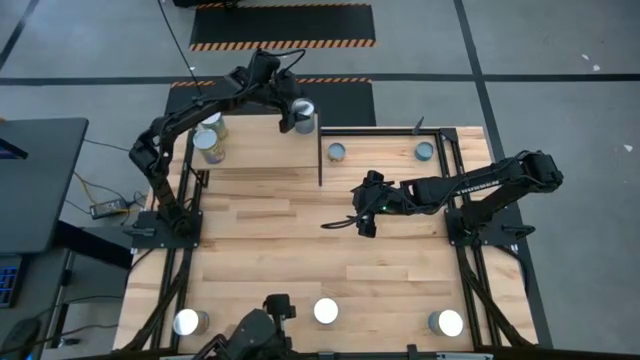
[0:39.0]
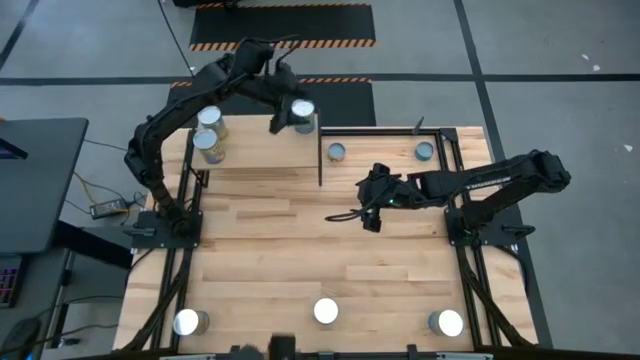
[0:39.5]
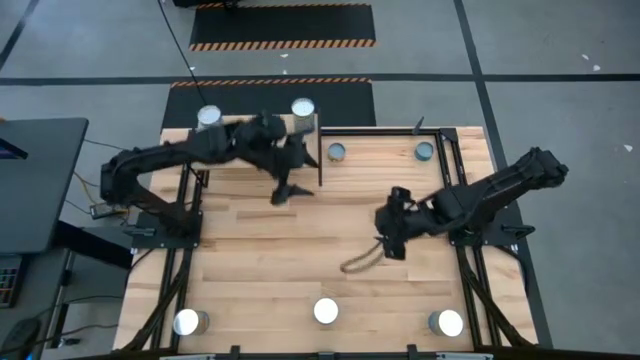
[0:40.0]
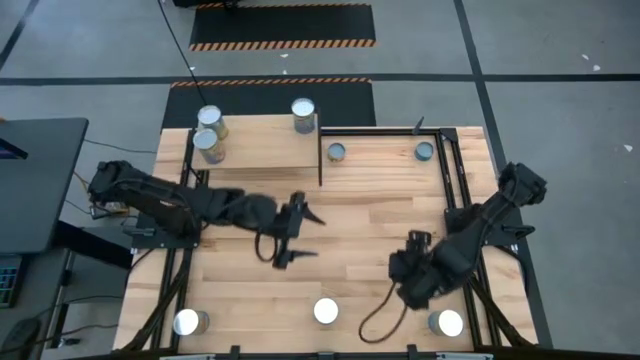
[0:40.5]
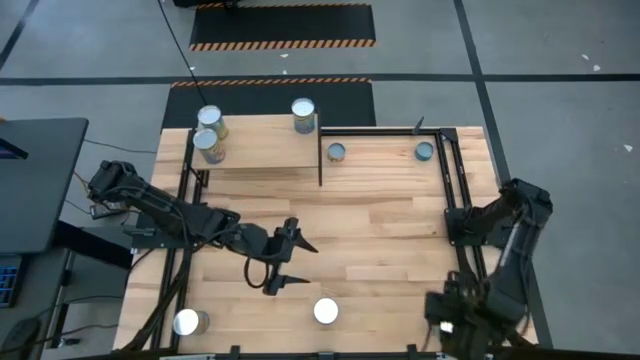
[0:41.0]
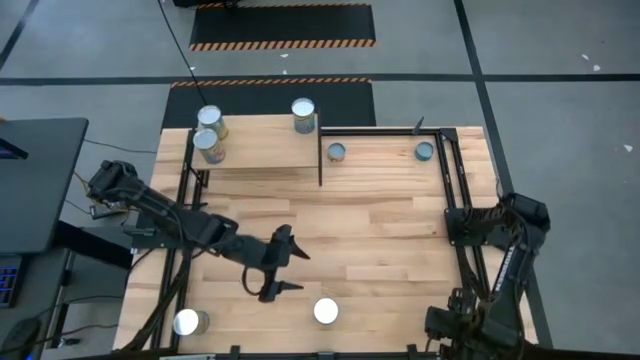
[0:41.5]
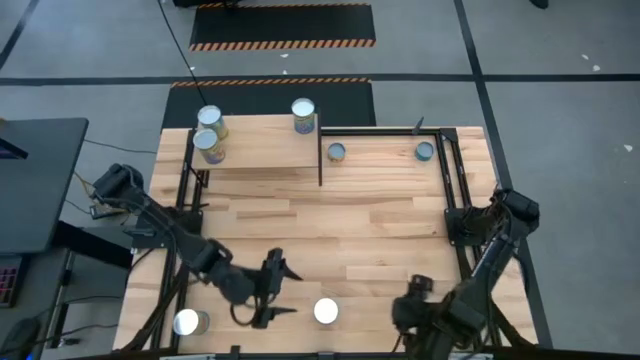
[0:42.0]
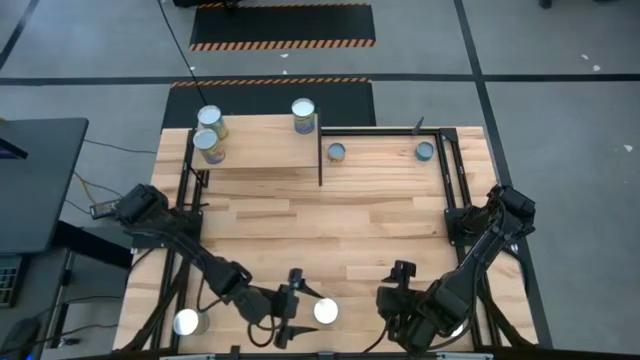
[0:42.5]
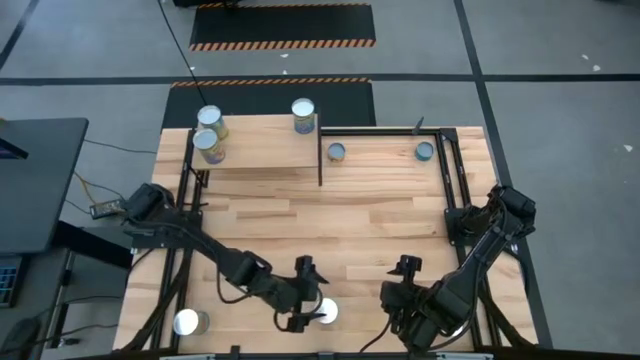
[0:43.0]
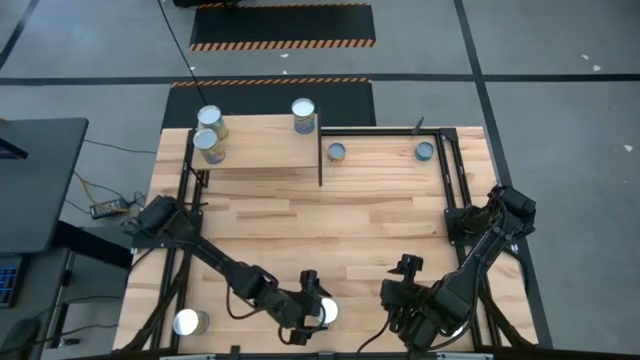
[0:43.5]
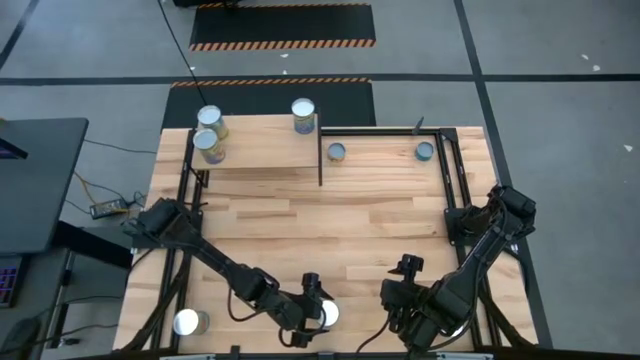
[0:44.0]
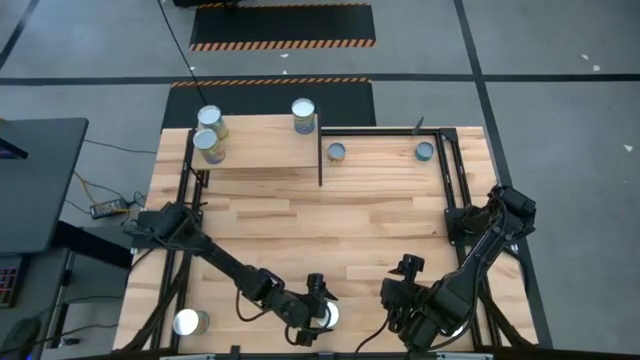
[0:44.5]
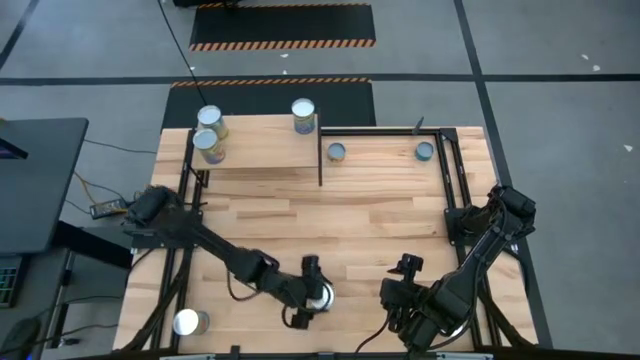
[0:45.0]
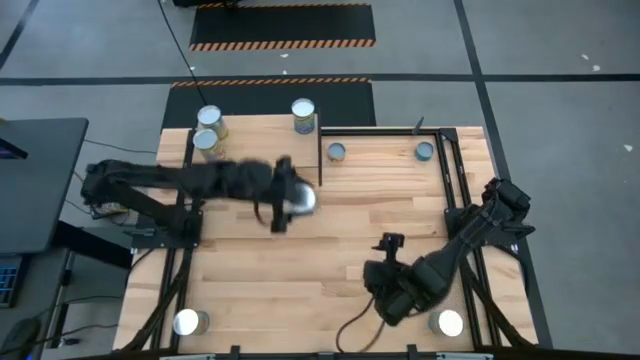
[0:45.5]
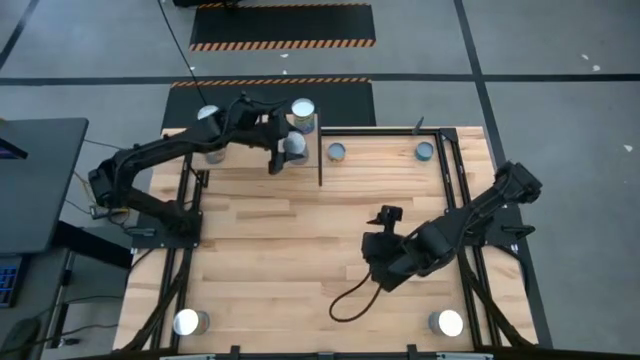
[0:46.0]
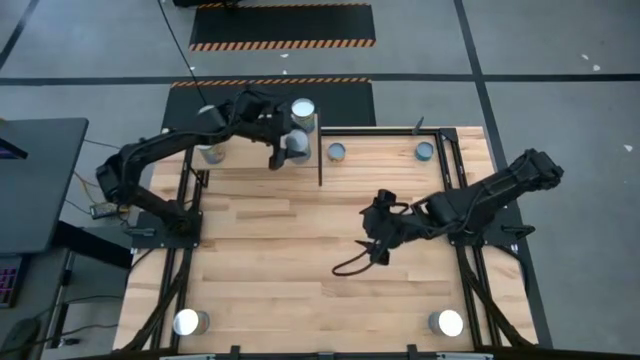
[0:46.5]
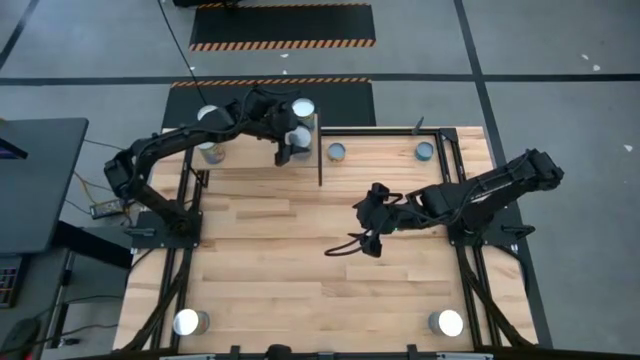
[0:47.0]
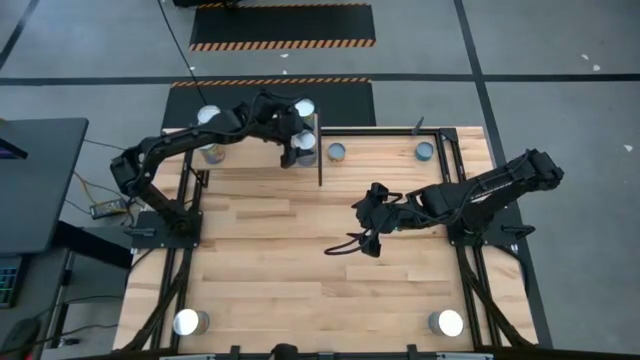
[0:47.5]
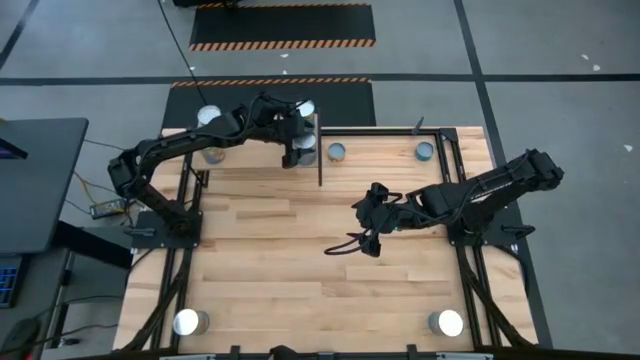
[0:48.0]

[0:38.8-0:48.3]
Task: Pick and place cans onto a shelf
Put the canned cherries aligned with the other canned cherries on the shelf

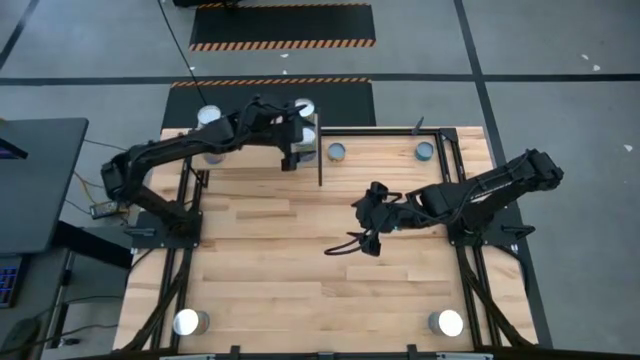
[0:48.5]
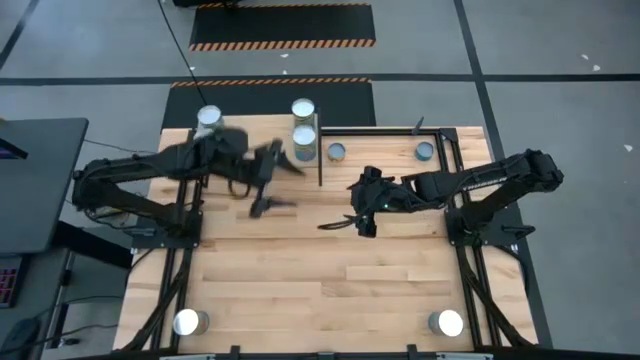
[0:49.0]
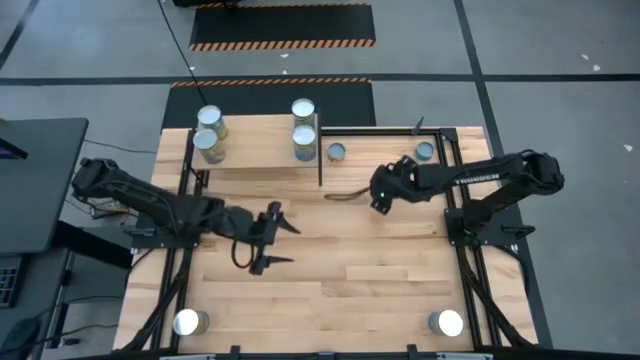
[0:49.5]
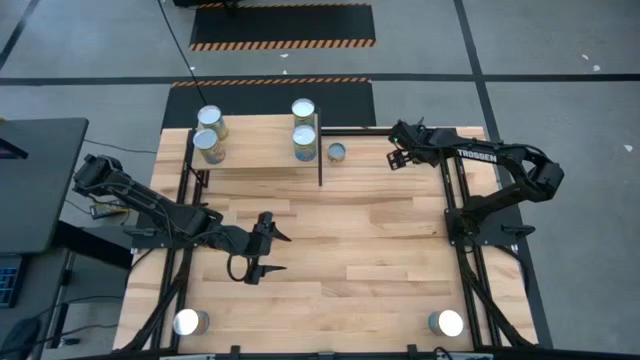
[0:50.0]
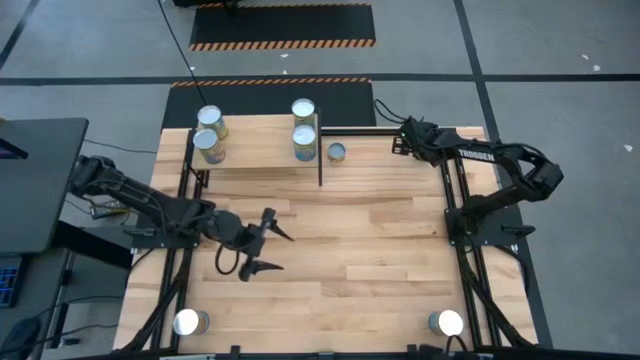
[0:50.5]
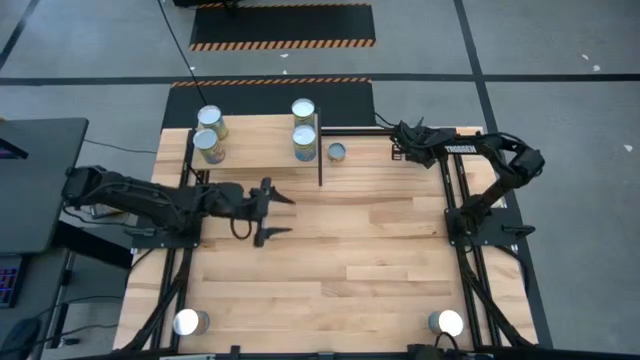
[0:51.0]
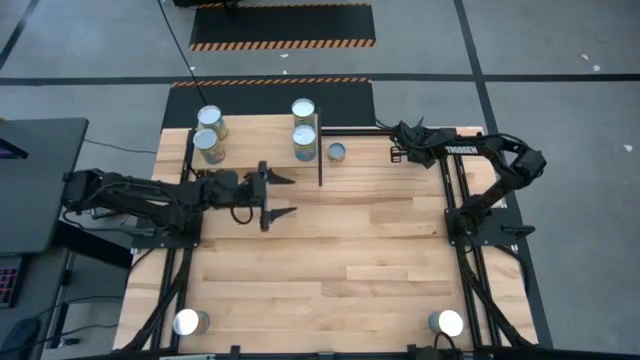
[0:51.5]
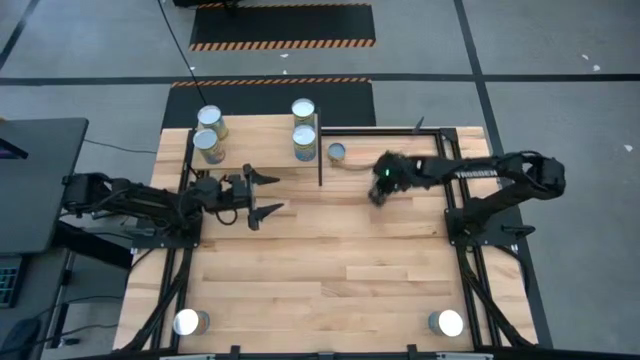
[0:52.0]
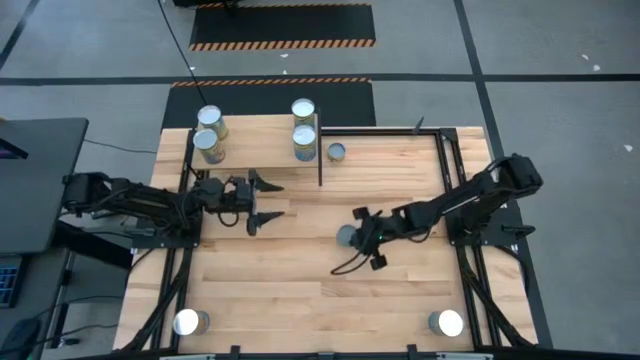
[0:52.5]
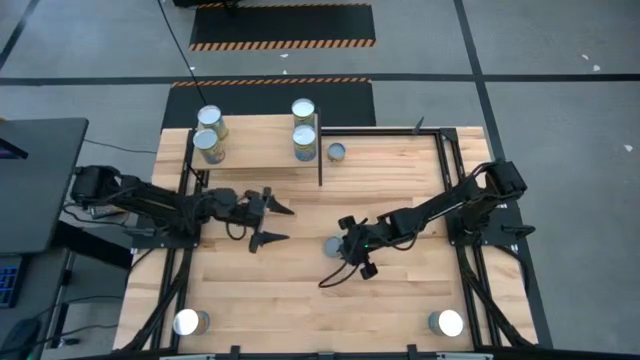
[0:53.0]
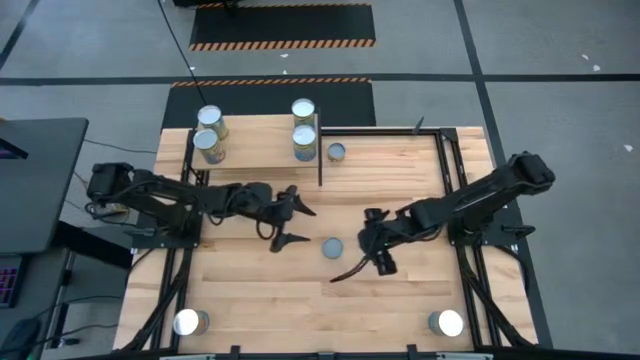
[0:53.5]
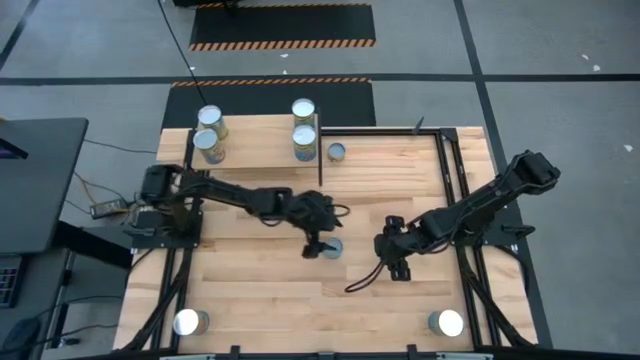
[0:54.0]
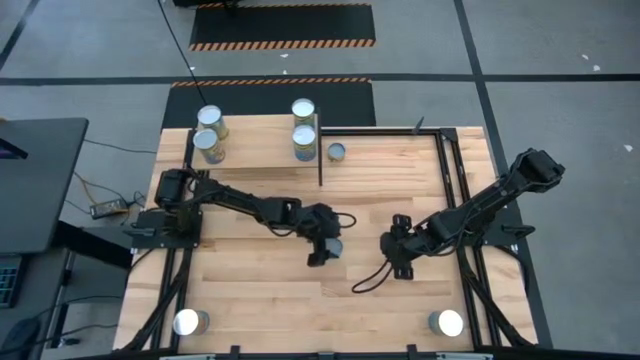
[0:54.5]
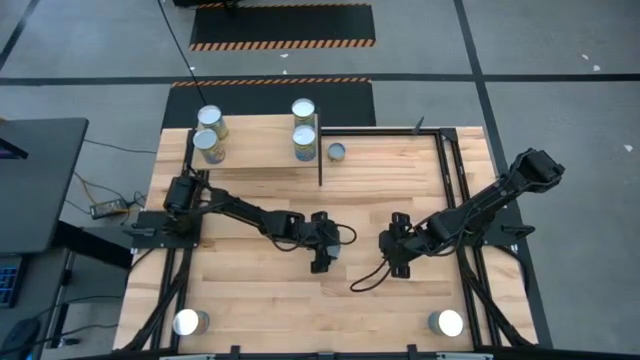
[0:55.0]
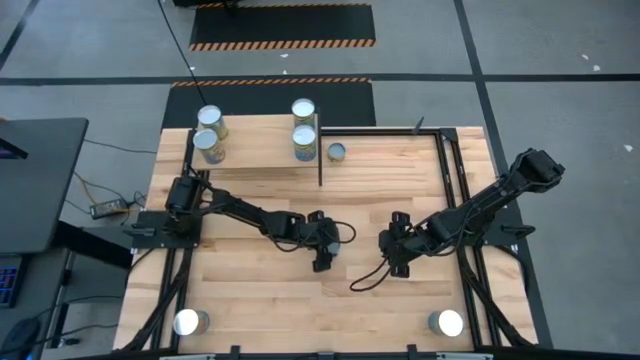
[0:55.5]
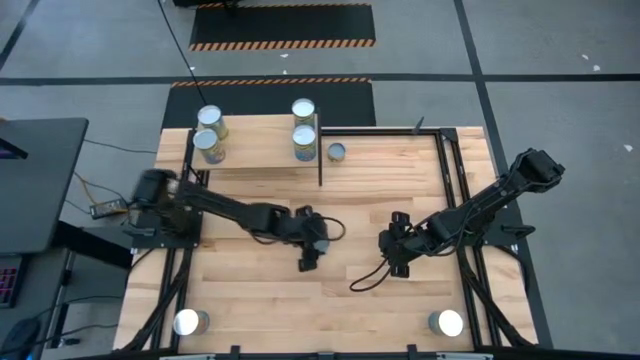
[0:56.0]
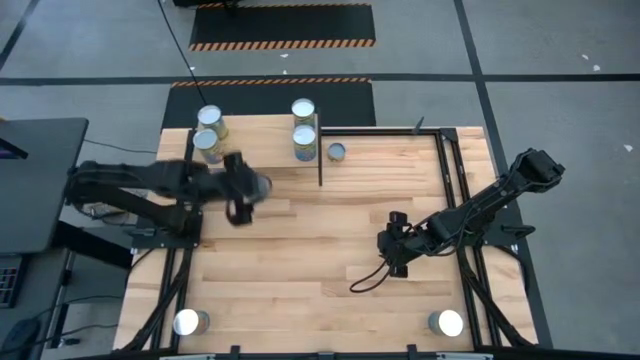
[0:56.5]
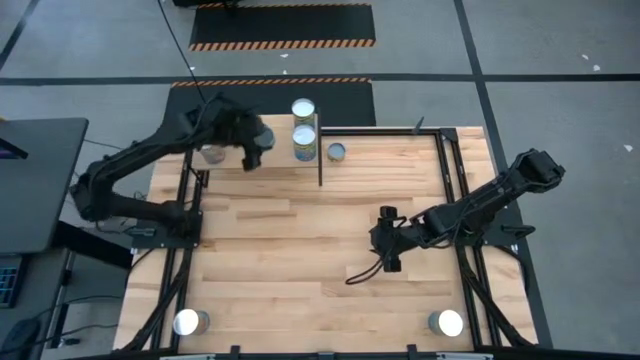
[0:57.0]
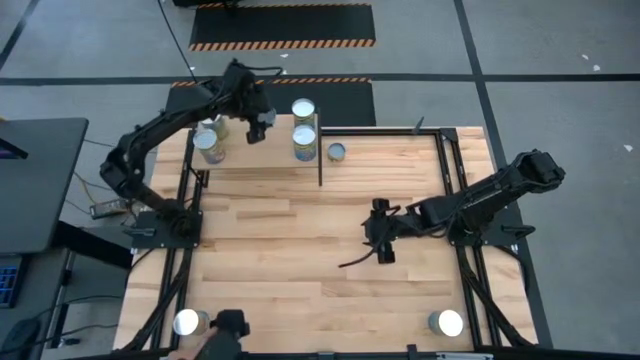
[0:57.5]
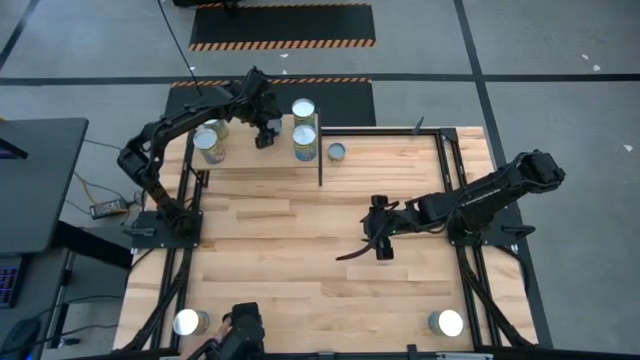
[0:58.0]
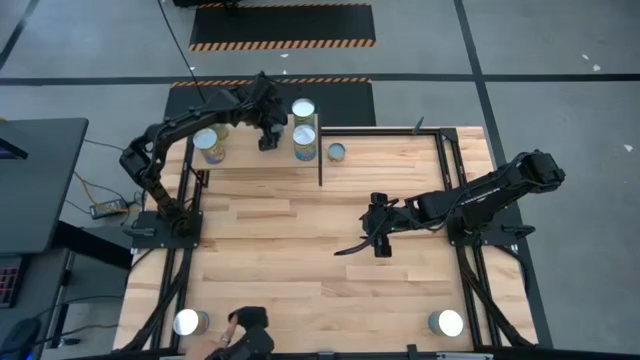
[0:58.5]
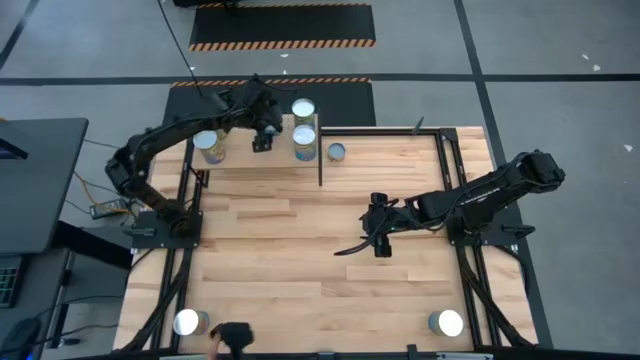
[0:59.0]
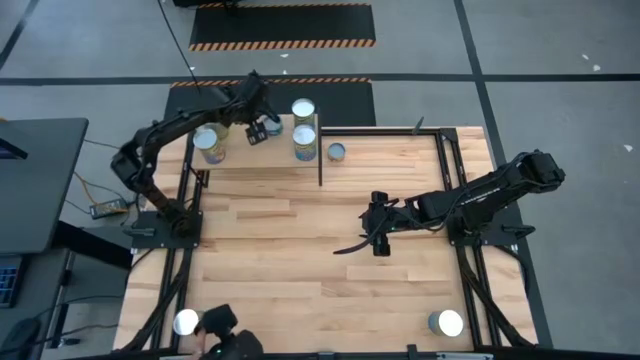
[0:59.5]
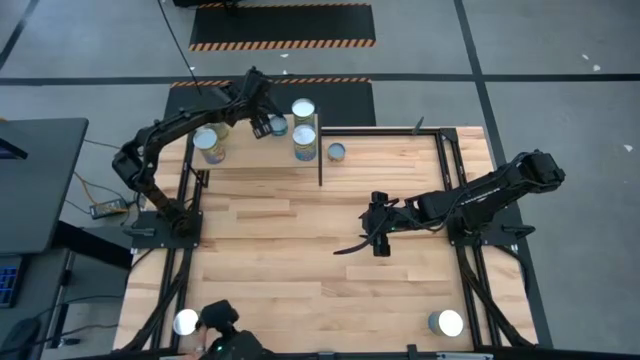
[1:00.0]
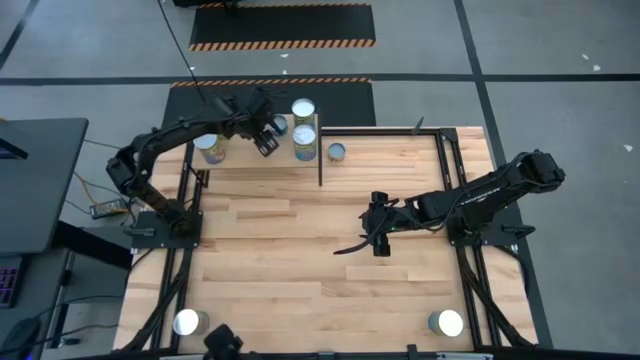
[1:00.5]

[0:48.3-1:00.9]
Put the tuna fish can on the shelf
